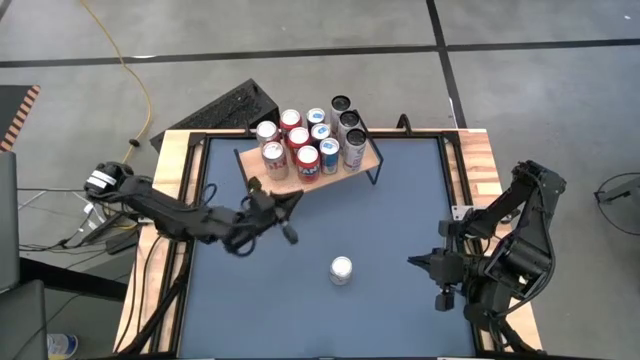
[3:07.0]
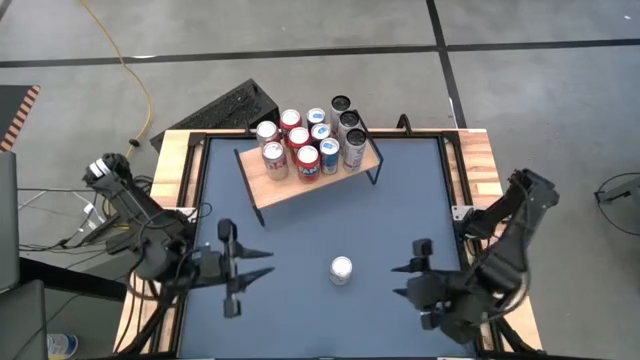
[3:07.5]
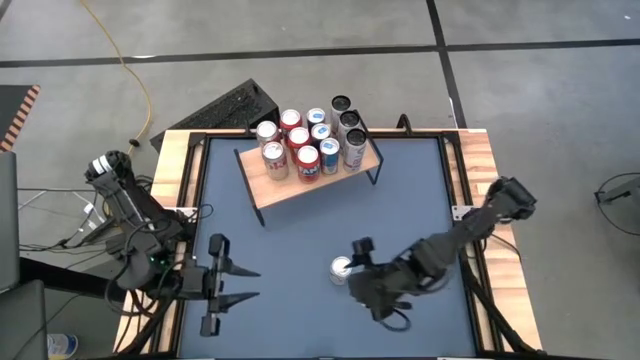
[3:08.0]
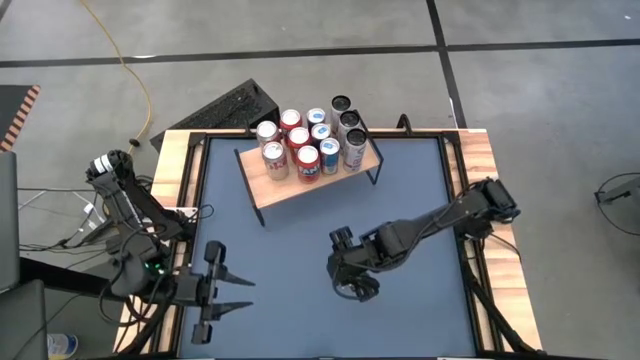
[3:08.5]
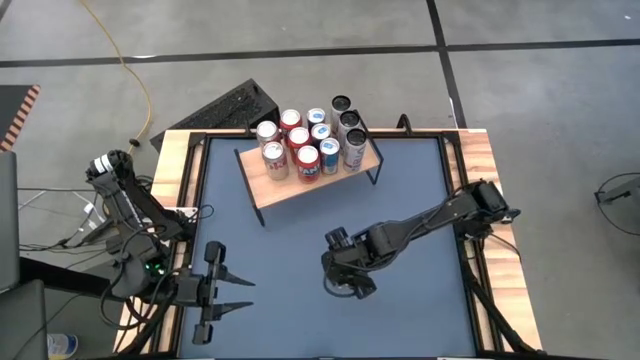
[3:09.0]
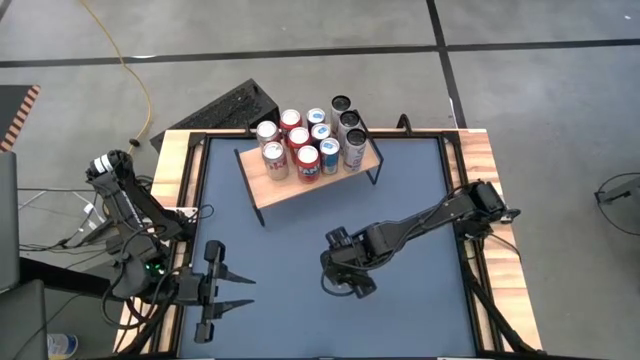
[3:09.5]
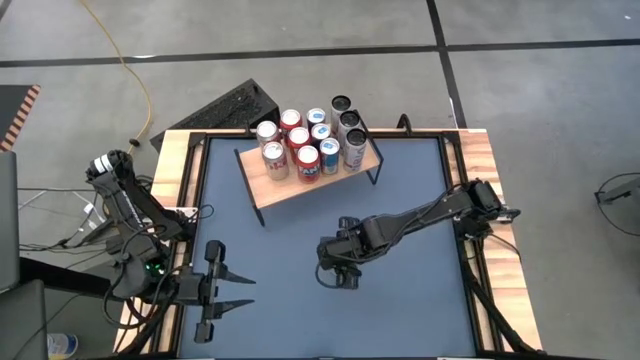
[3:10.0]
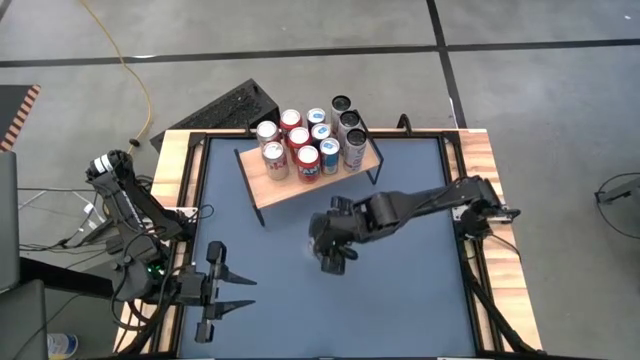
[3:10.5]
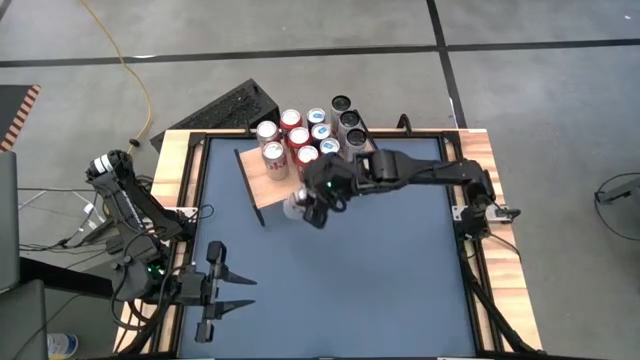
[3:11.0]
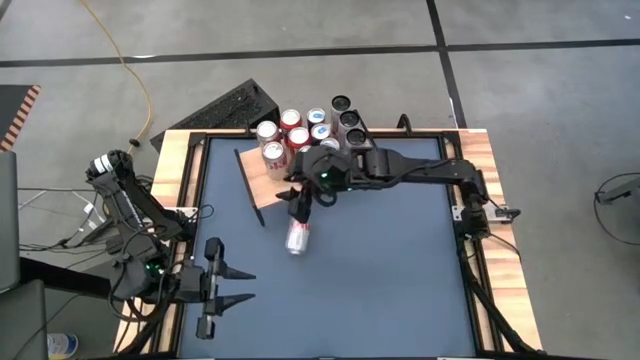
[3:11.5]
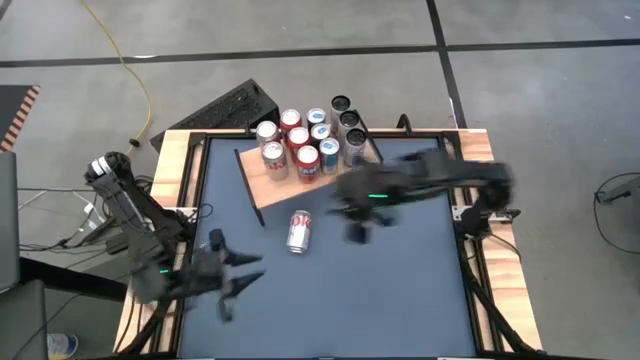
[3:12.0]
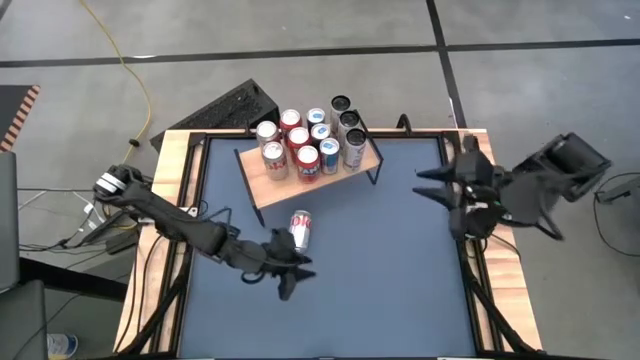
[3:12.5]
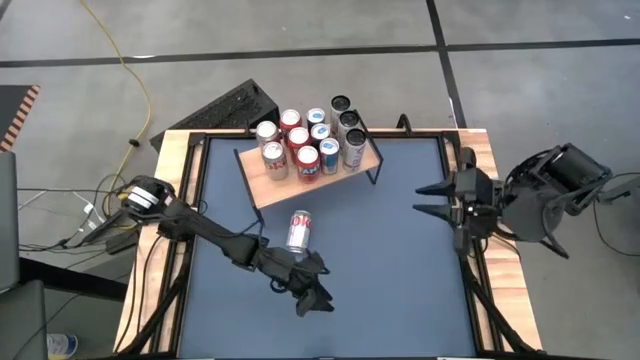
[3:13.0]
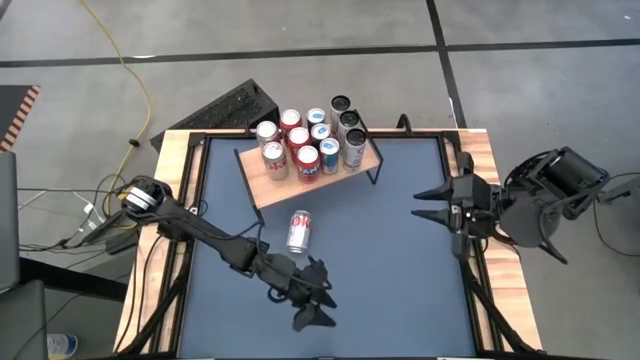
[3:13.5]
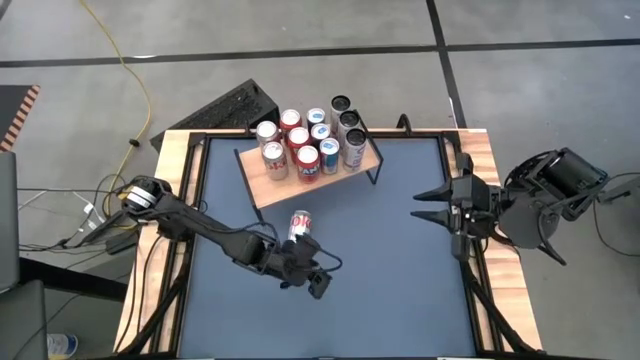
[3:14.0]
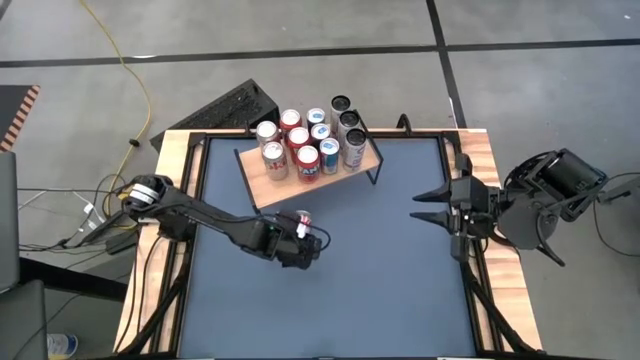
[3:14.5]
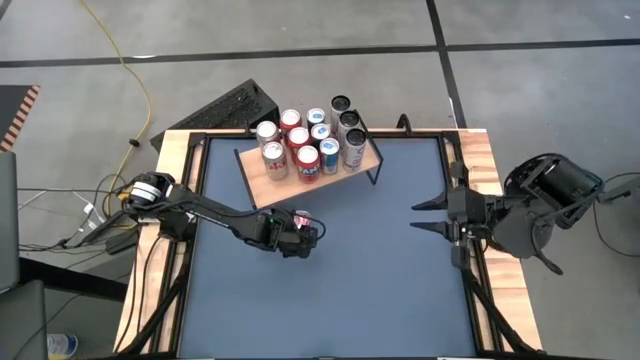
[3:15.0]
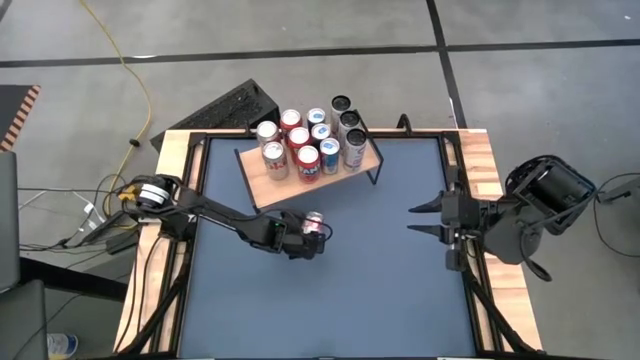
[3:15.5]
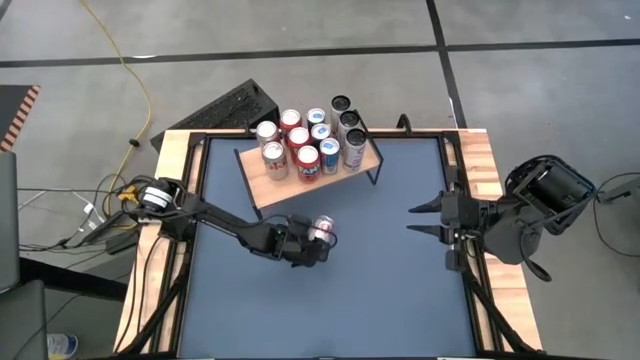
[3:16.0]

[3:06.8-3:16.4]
Task: Place canned beverage on shelf
Put the silver soda can on the shelf aligned with the other silver soda cans

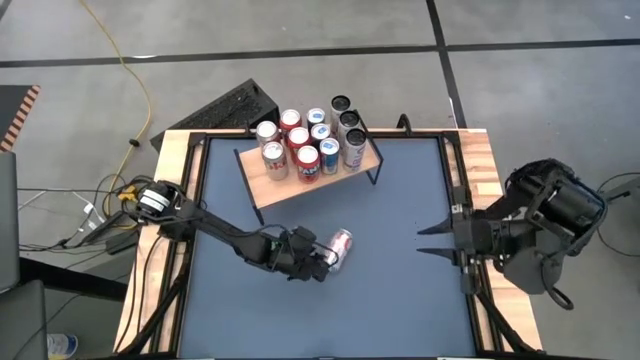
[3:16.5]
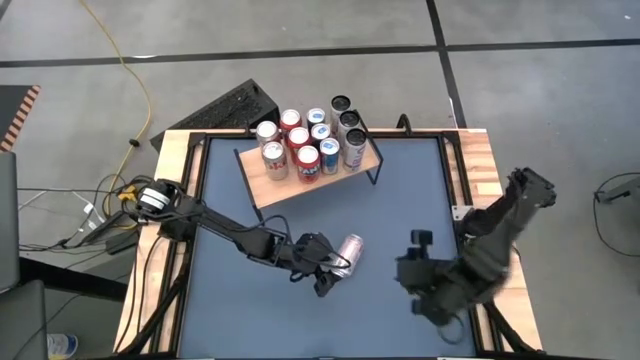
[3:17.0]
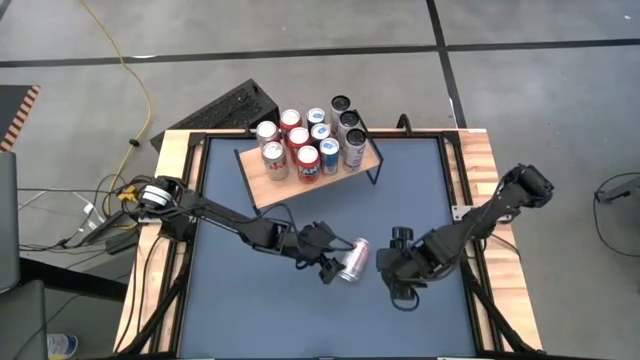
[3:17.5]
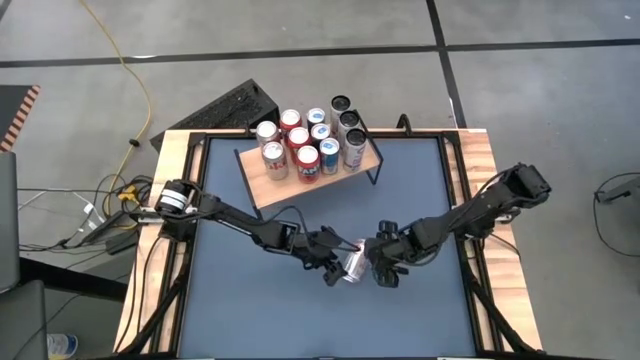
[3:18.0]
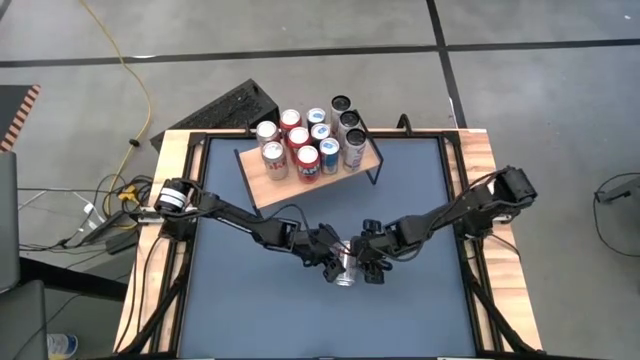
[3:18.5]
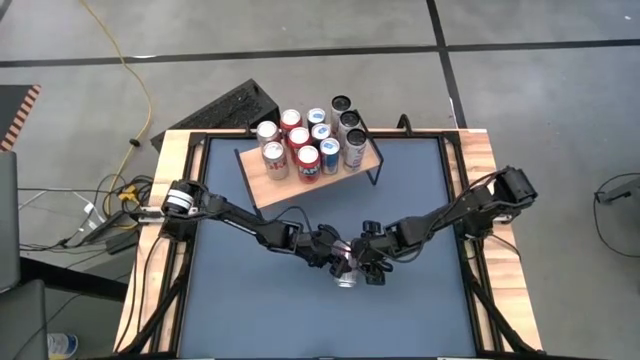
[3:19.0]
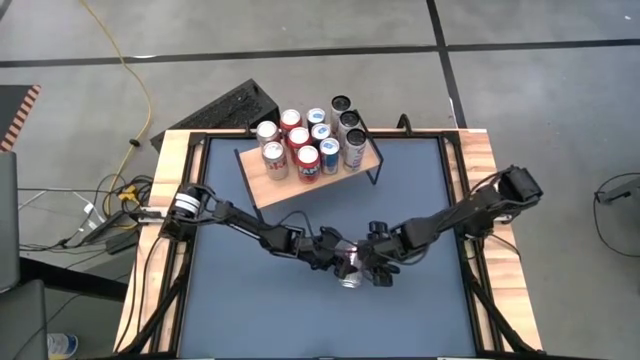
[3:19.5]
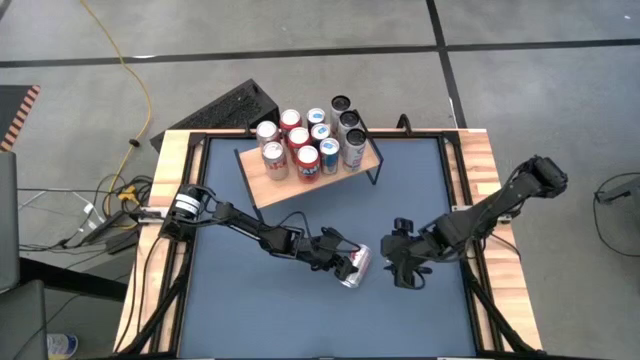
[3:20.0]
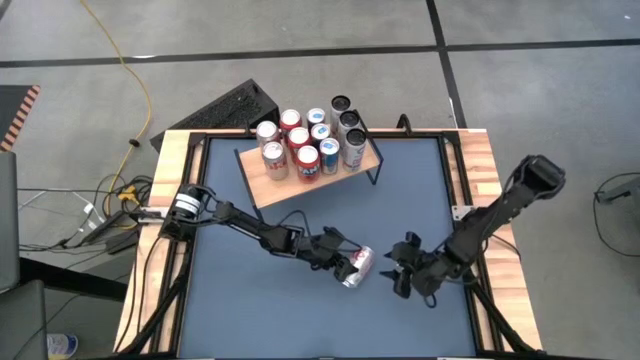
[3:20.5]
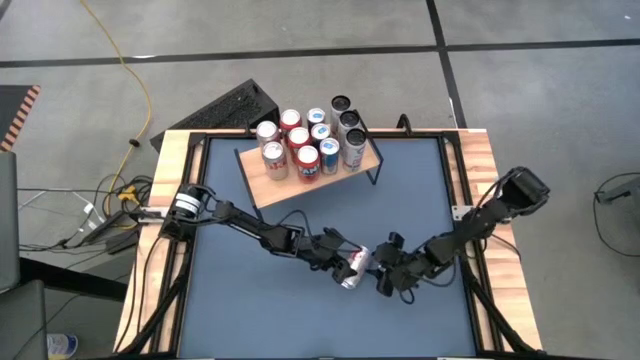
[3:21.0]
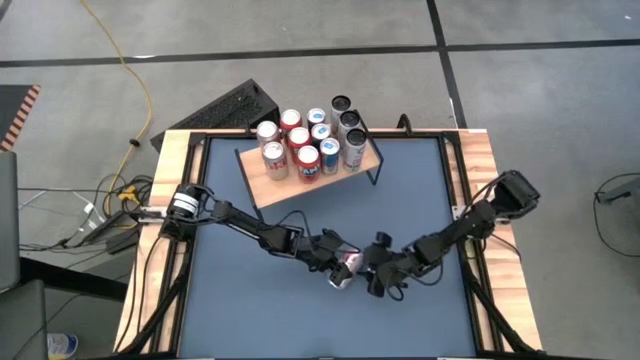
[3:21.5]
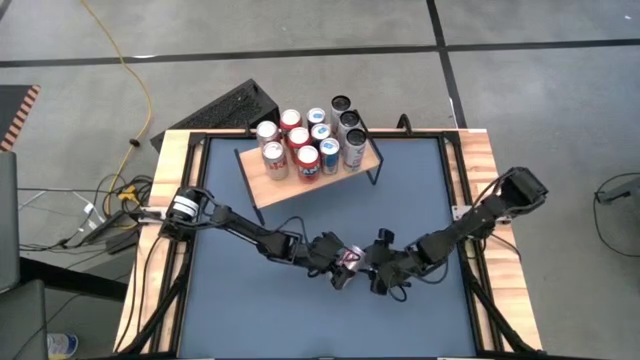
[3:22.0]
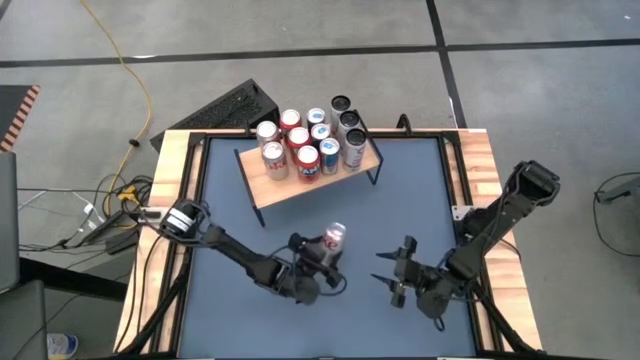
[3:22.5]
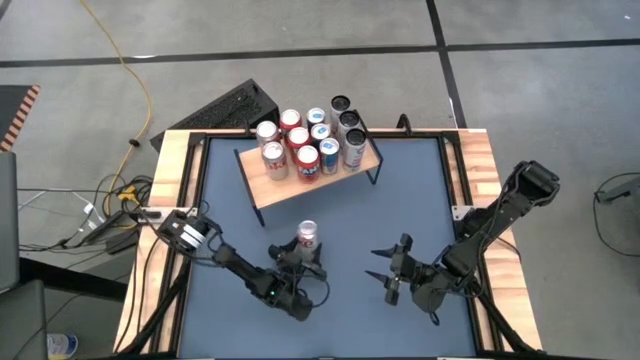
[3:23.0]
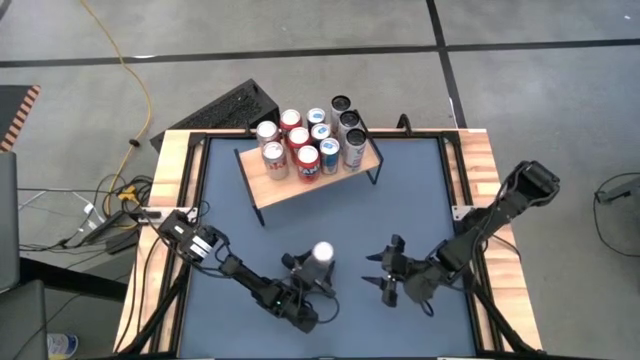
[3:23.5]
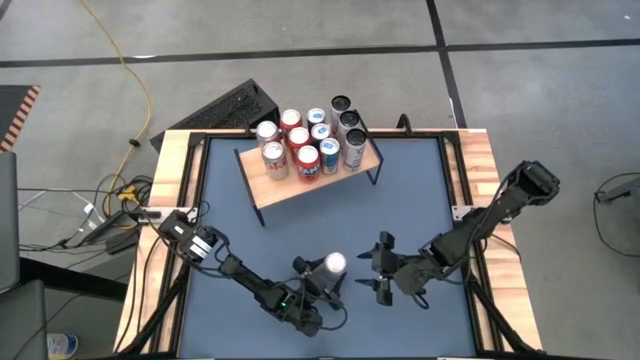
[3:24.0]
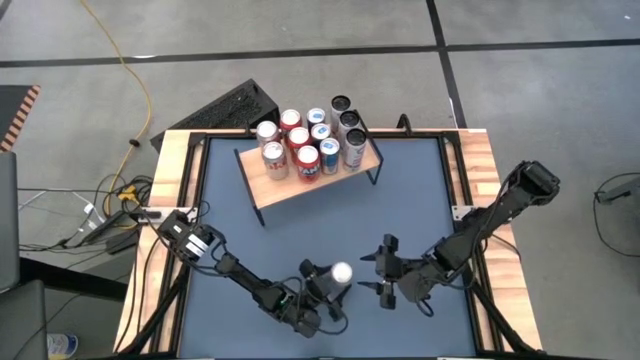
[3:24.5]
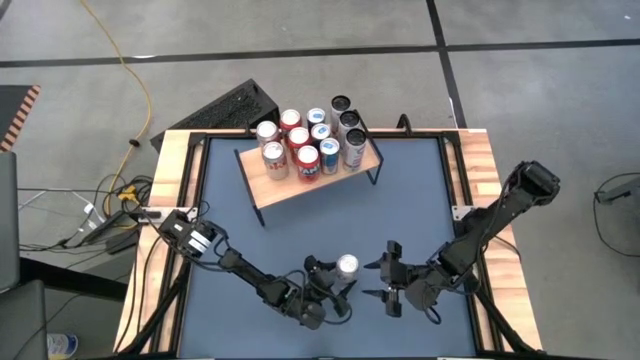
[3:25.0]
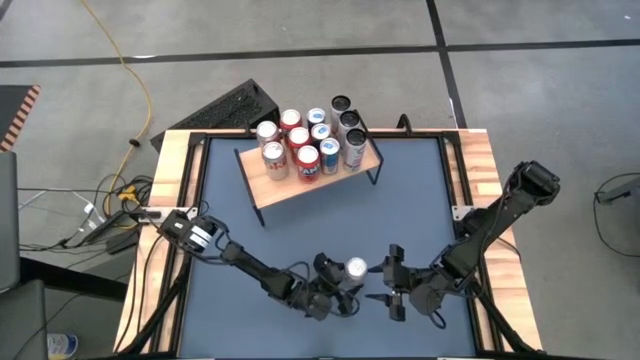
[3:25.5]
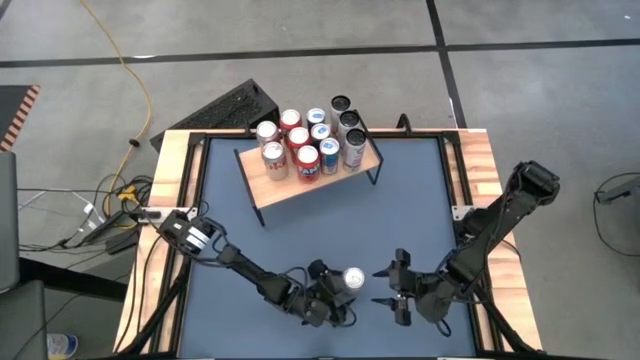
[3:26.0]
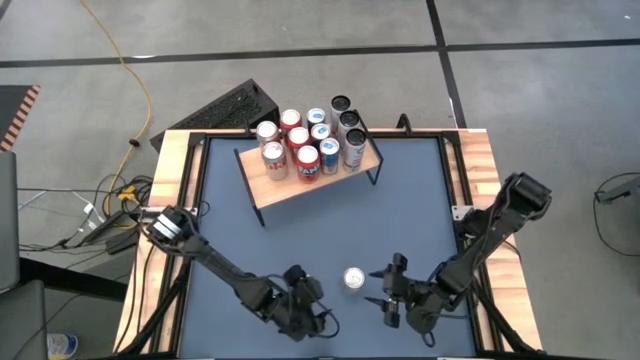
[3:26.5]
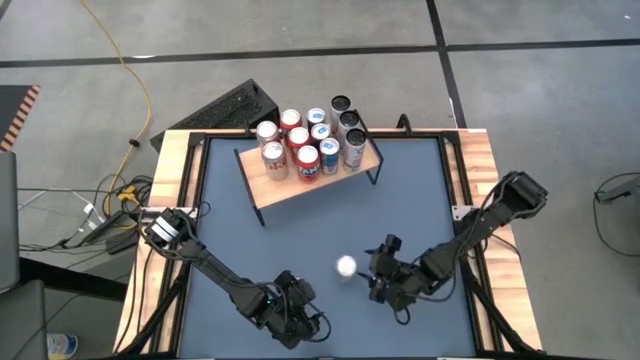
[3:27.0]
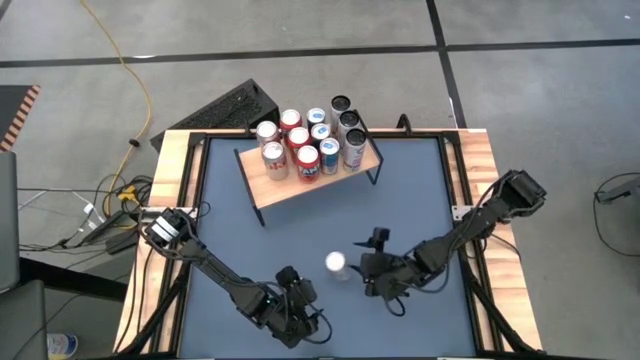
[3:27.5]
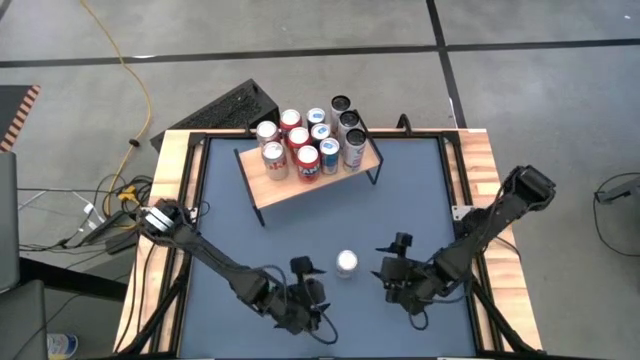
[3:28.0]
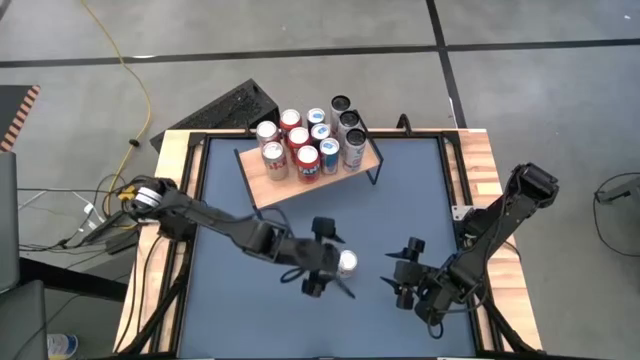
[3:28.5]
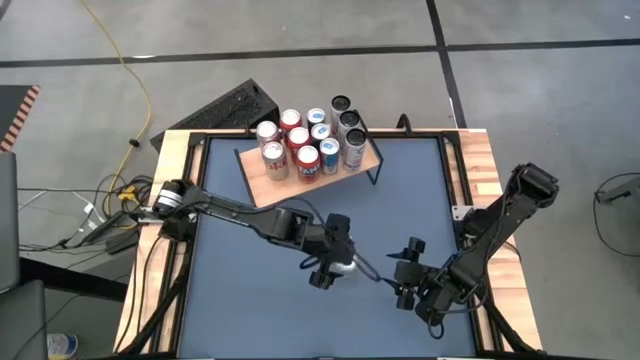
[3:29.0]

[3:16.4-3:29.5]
Put the silver soda can on the shelf aligned with the other silver soda cans
